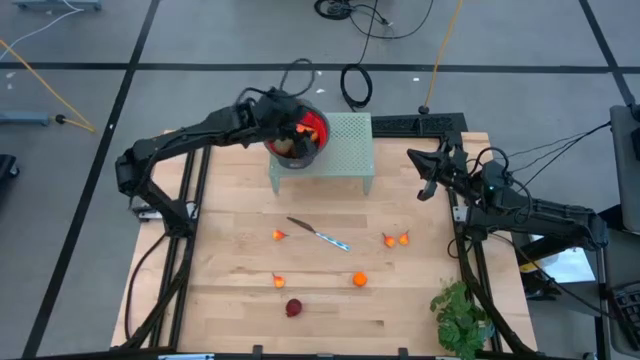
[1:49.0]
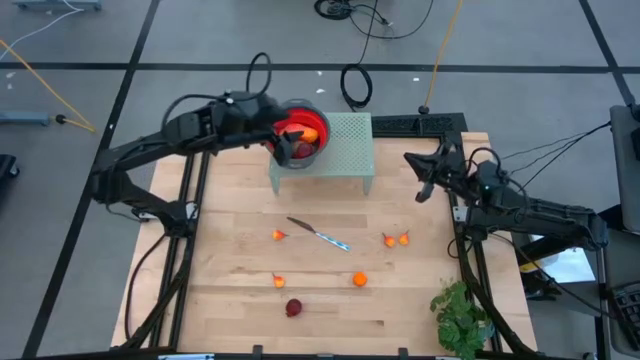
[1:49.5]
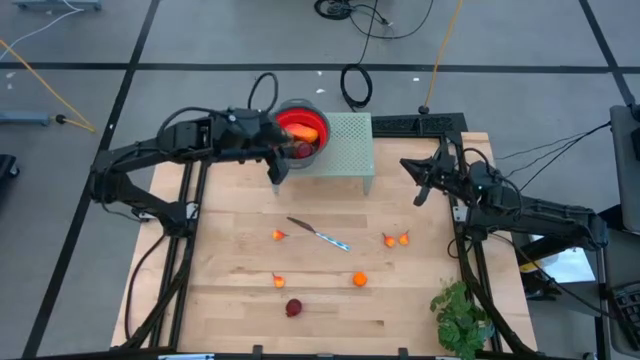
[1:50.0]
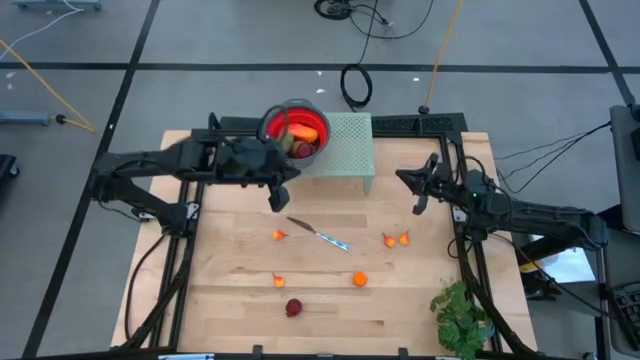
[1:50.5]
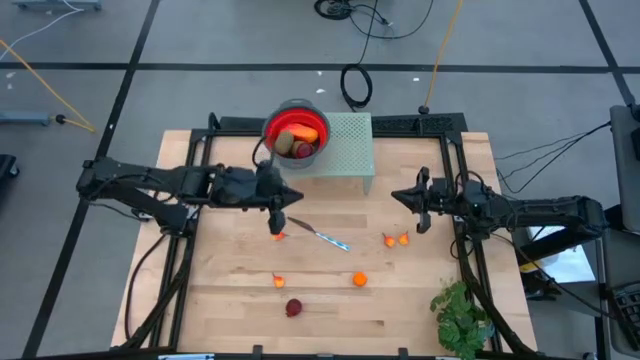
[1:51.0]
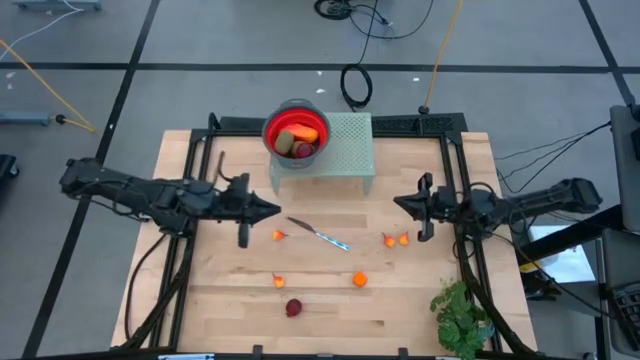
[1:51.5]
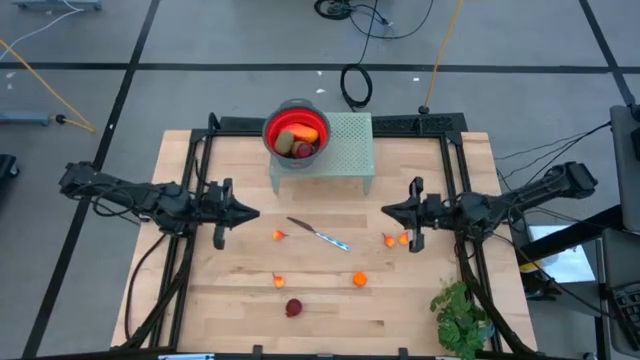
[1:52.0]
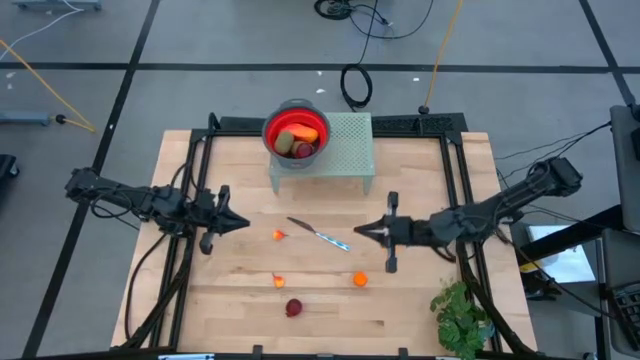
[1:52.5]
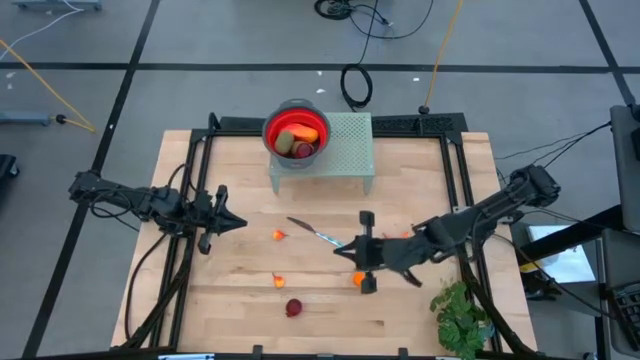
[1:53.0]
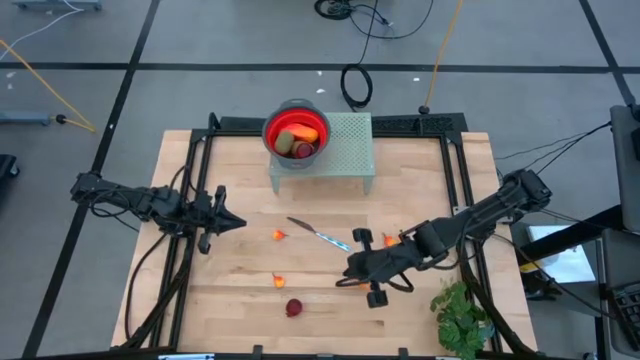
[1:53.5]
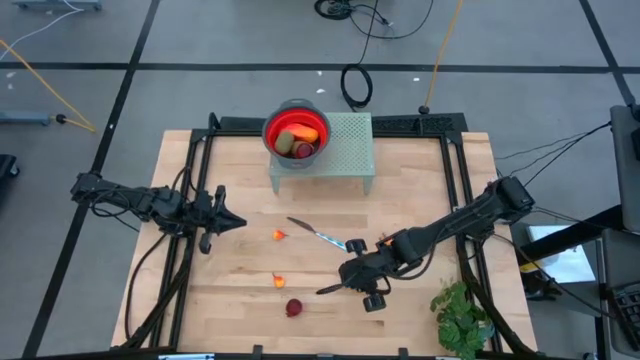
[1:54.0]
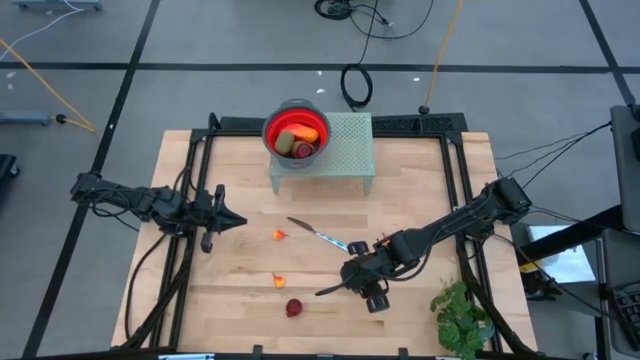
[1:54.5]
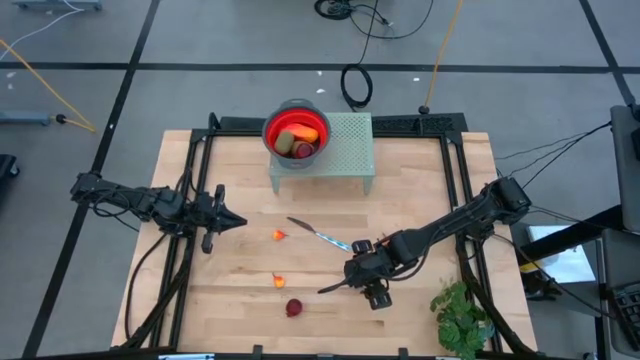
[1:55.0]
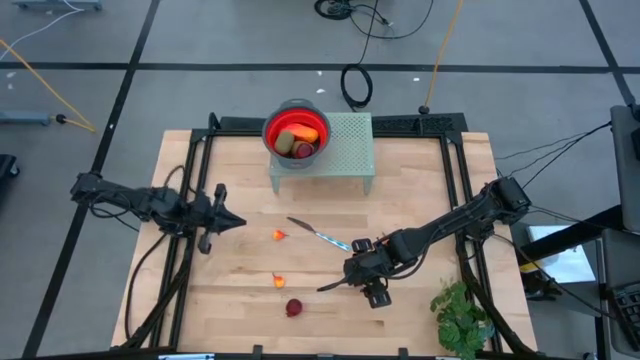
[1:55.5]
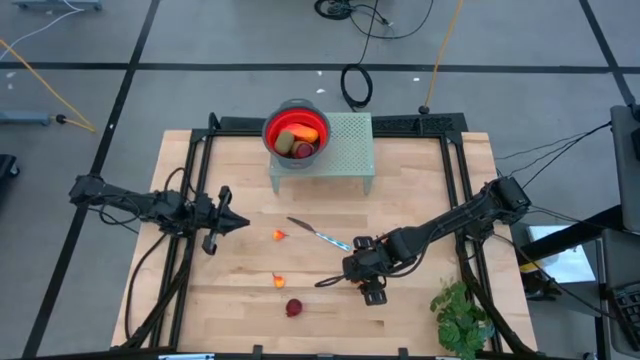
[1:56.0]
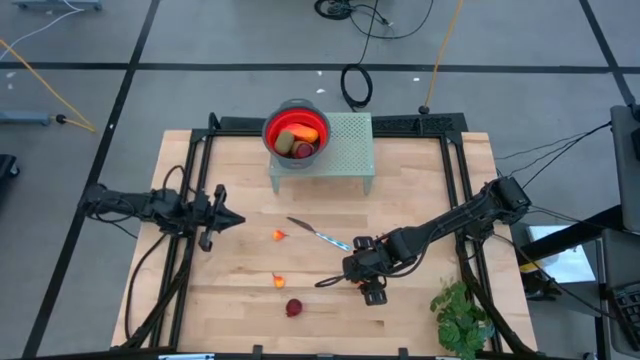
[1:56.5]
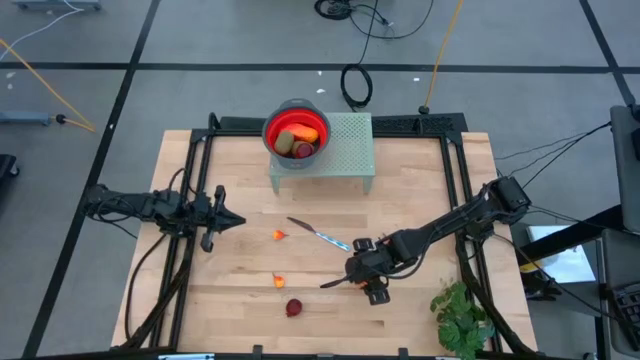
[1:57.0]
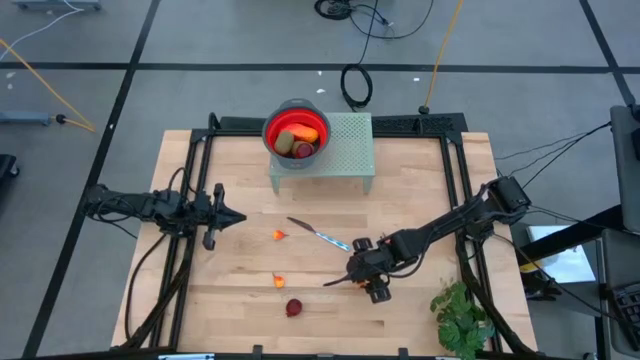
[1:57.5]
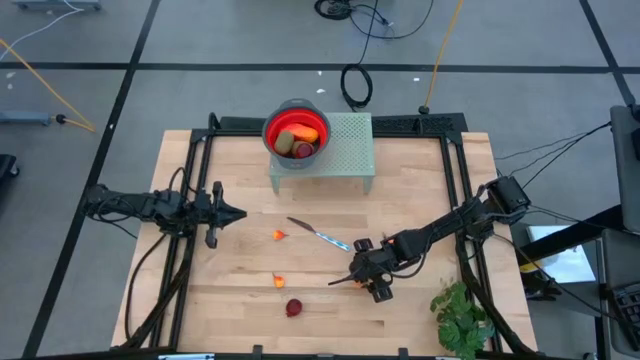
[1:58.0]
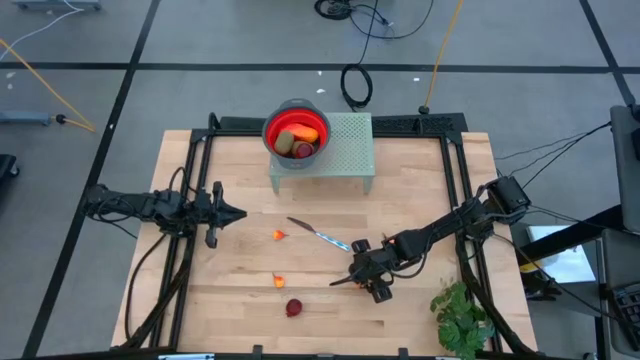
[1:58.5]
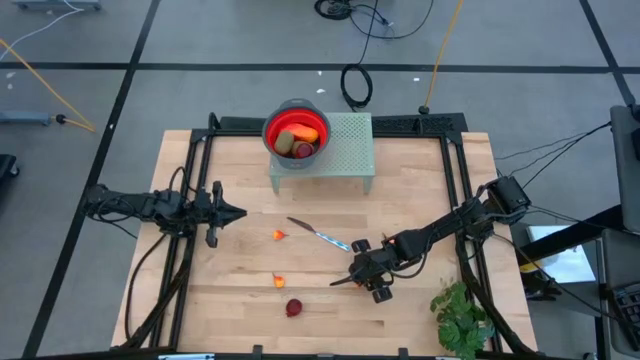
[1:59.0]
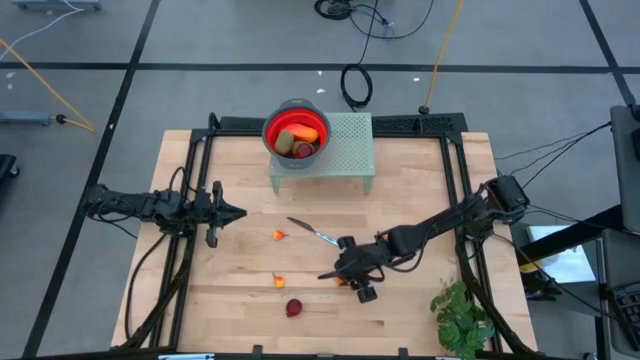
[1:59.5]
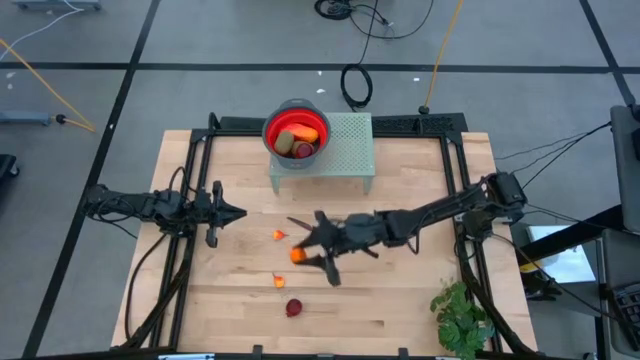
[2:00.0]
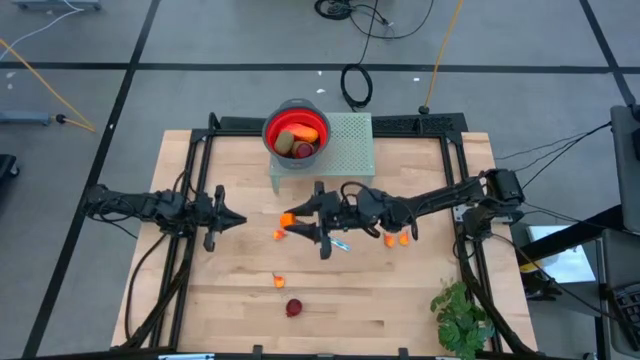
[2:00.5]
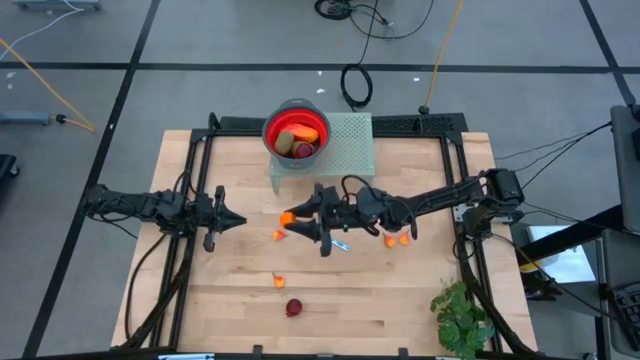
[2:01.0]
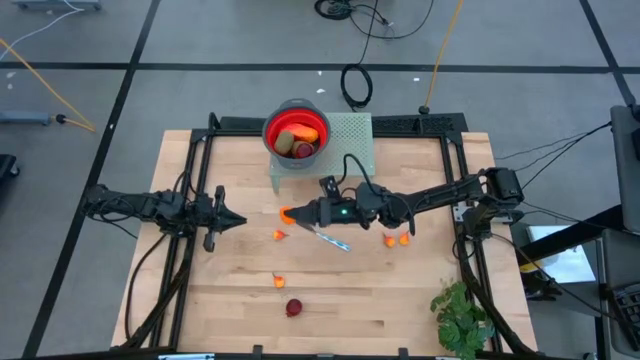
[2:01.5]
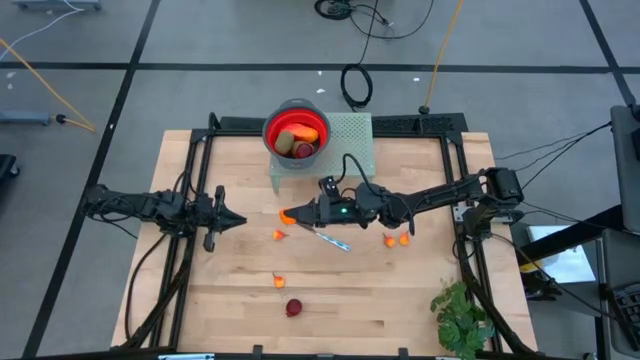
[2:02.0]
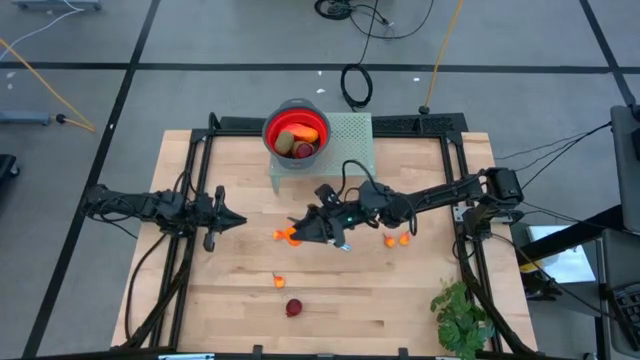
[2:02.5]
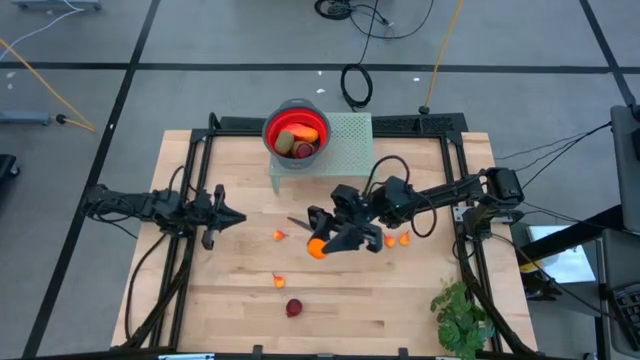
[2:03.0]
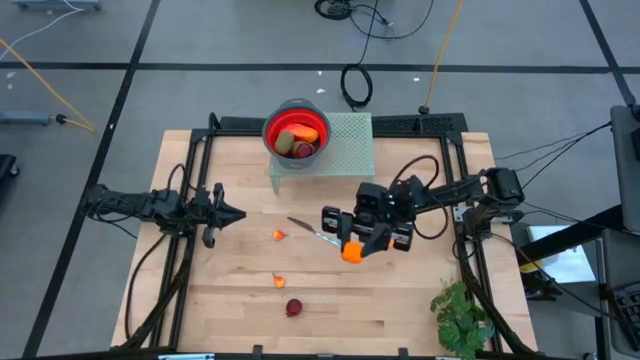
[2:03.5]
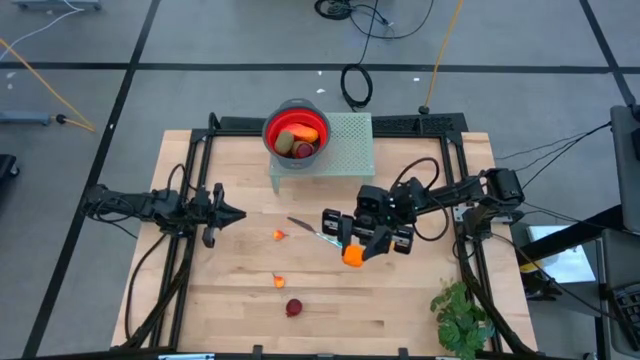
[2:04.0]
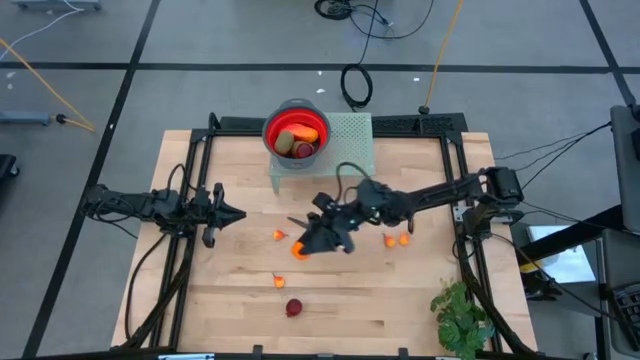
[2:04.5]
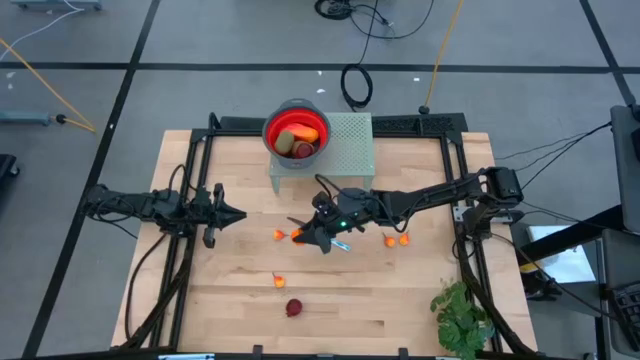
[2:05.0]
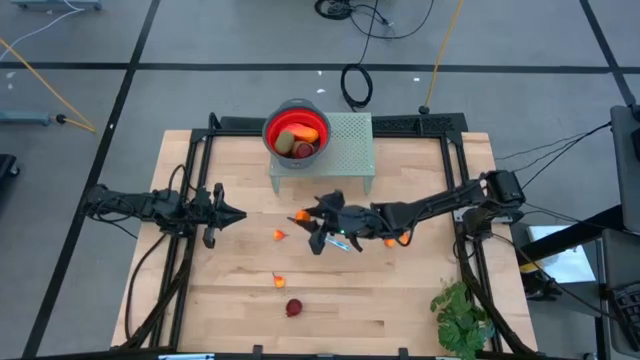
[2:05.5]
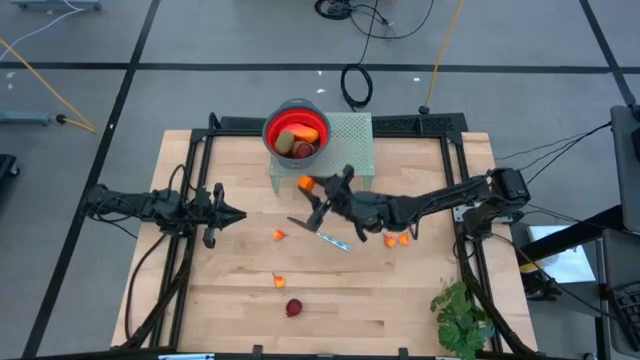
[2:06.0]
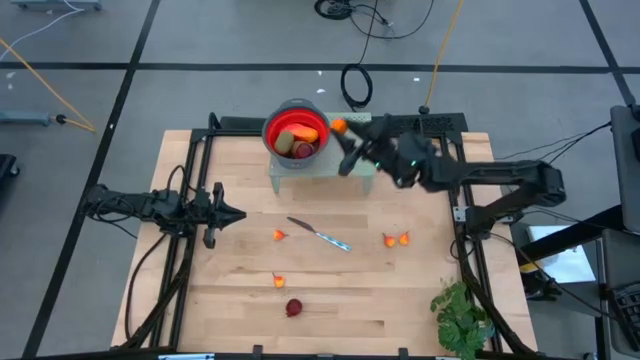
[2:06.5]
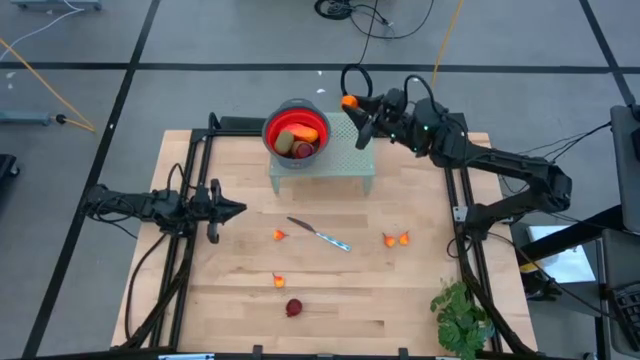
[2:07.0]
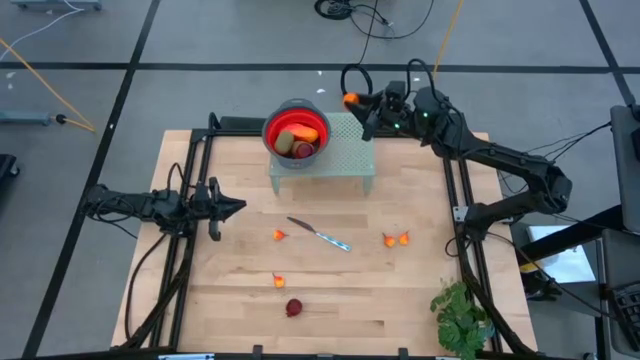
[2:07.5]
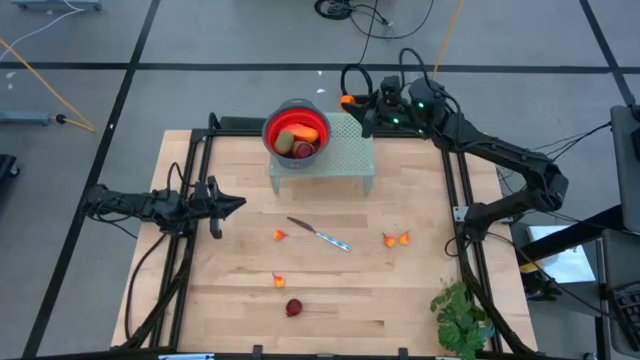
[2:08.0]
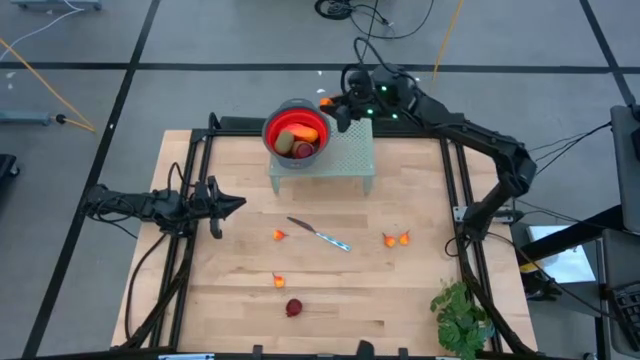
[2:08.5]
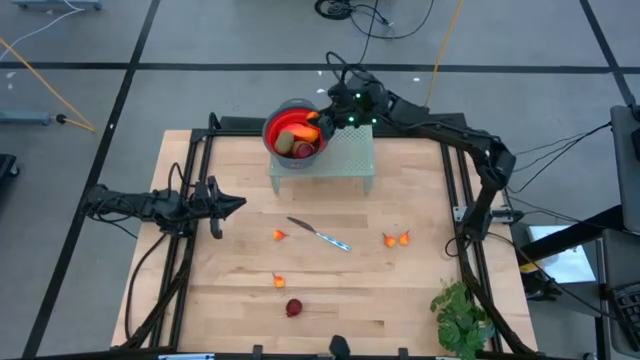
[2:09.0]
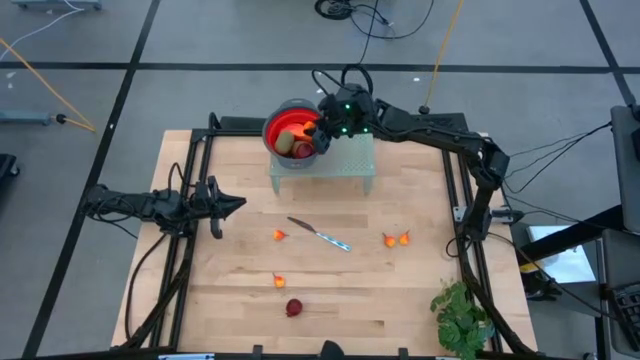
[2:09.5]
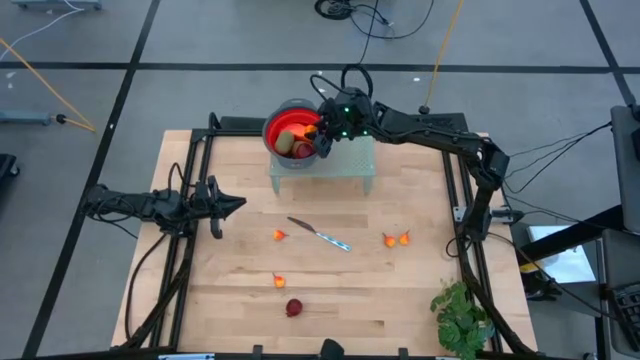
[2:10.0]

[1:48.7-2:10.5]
Task: Pick & Place Fruit
Put the tangerine into the red strainer bowl
